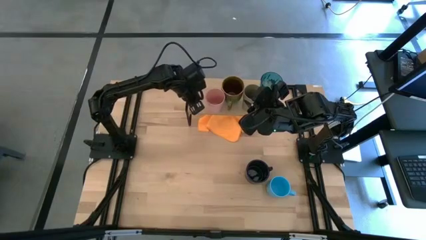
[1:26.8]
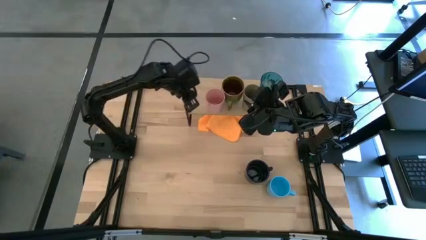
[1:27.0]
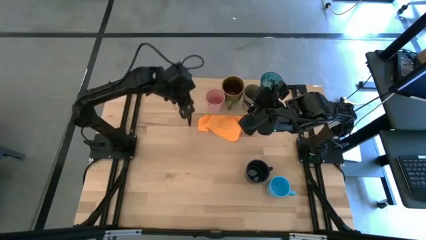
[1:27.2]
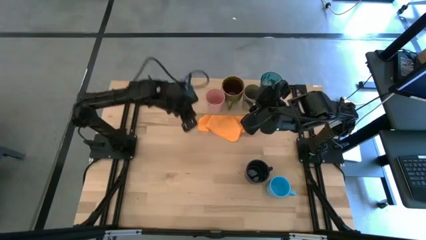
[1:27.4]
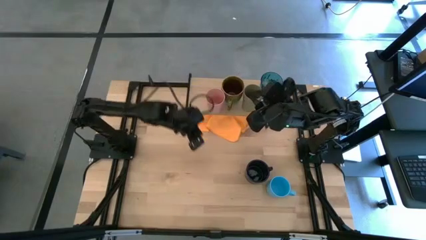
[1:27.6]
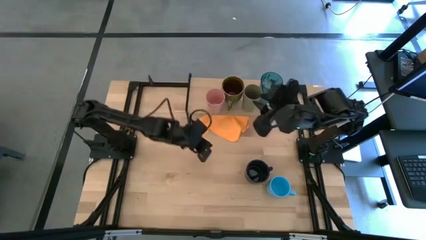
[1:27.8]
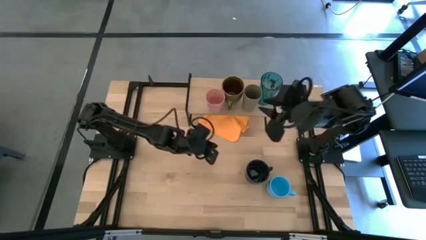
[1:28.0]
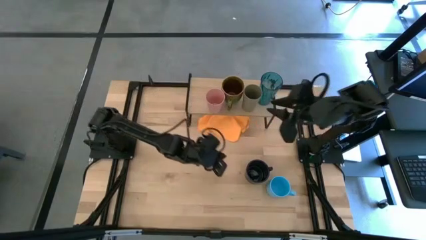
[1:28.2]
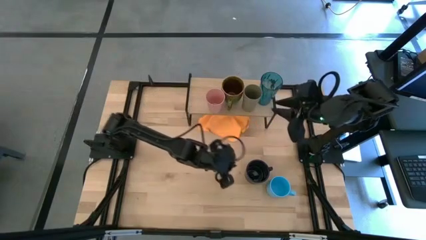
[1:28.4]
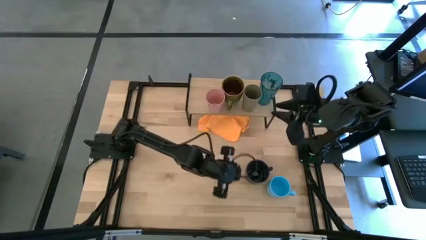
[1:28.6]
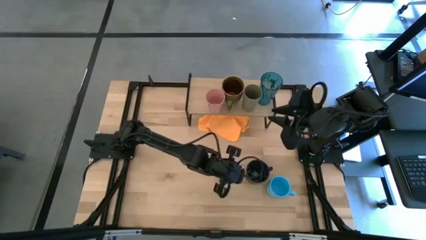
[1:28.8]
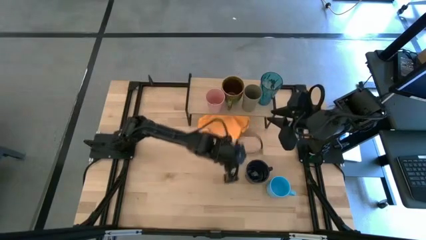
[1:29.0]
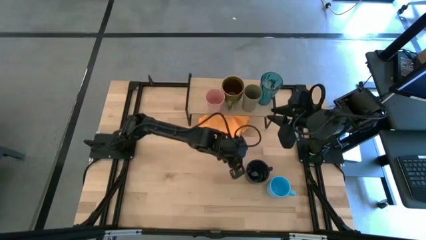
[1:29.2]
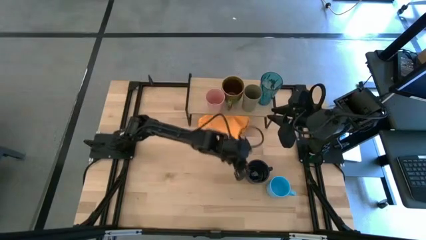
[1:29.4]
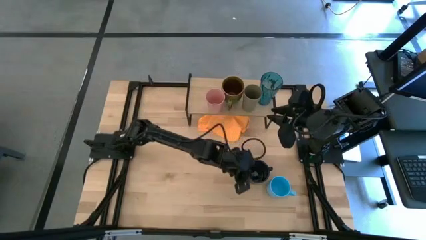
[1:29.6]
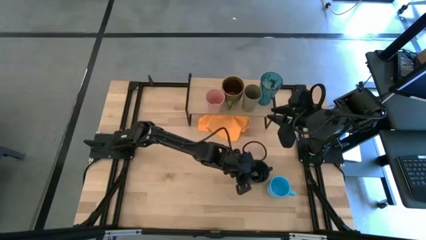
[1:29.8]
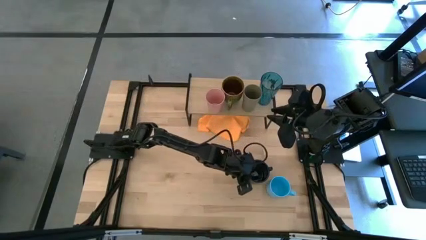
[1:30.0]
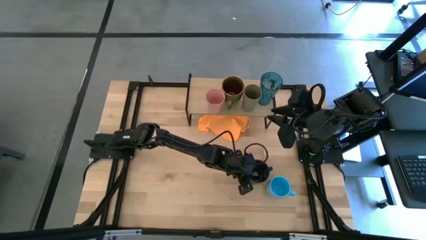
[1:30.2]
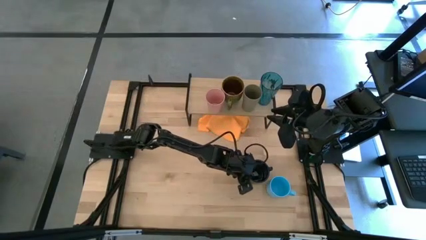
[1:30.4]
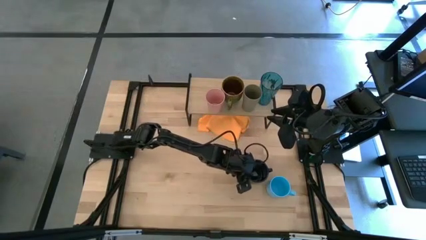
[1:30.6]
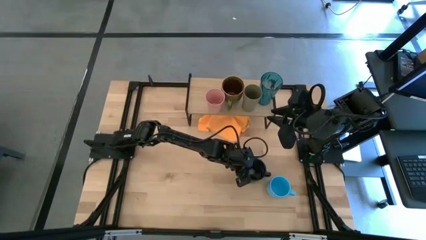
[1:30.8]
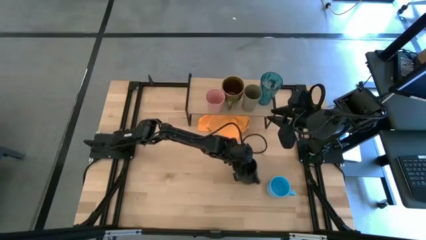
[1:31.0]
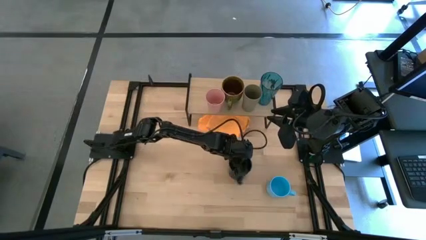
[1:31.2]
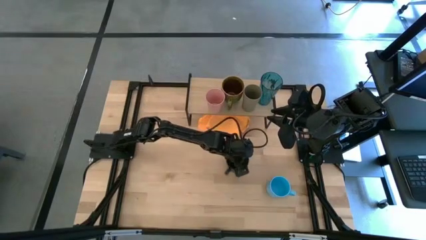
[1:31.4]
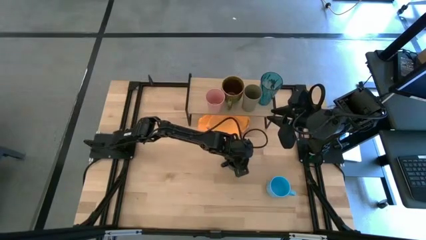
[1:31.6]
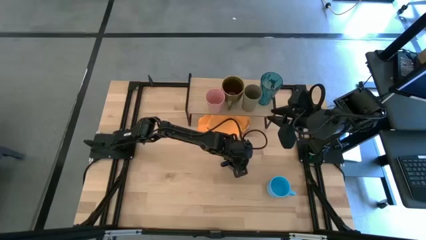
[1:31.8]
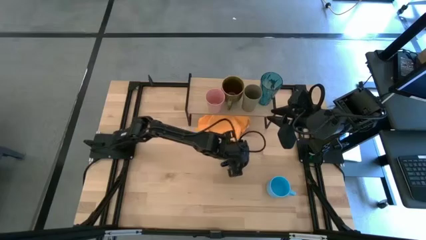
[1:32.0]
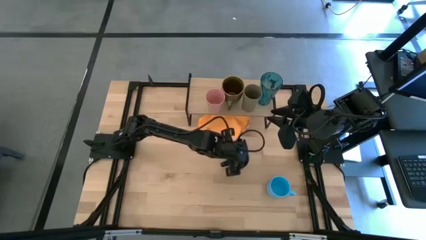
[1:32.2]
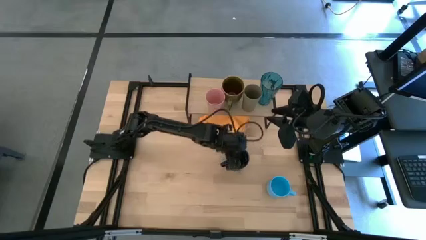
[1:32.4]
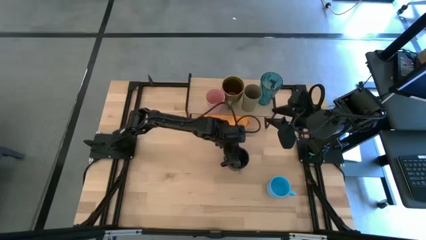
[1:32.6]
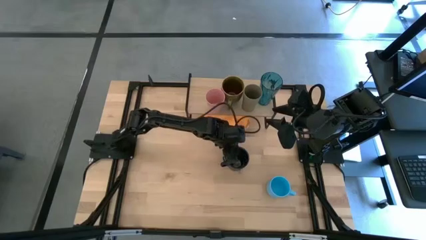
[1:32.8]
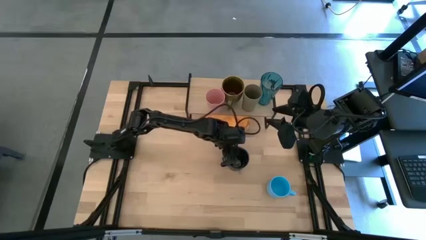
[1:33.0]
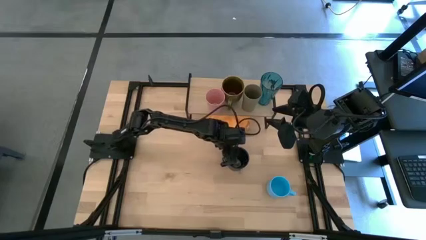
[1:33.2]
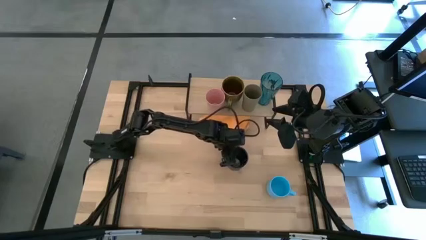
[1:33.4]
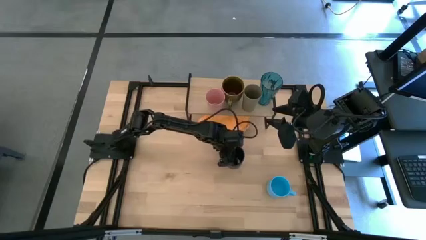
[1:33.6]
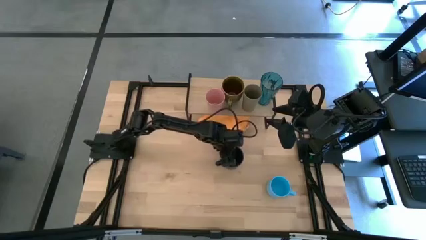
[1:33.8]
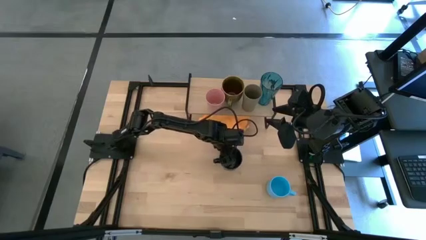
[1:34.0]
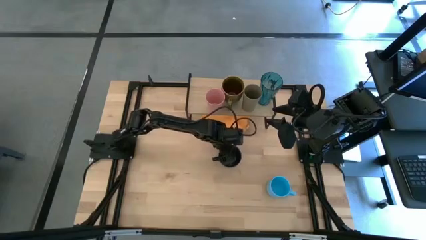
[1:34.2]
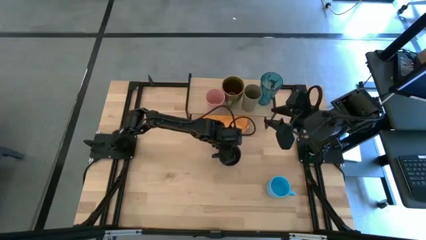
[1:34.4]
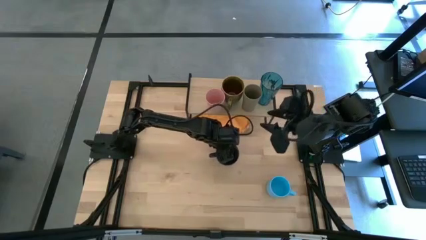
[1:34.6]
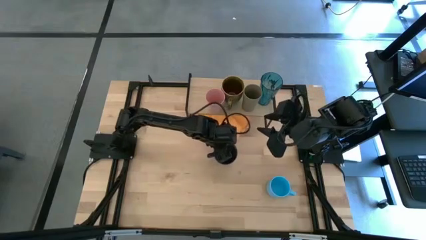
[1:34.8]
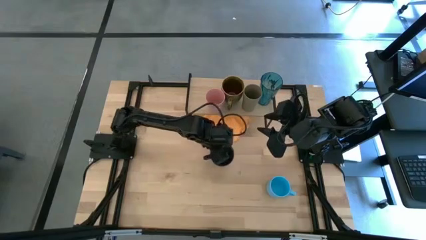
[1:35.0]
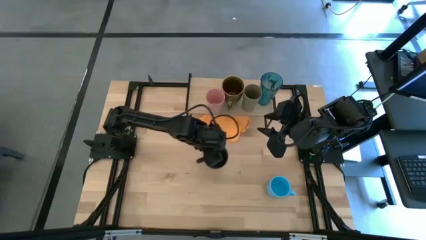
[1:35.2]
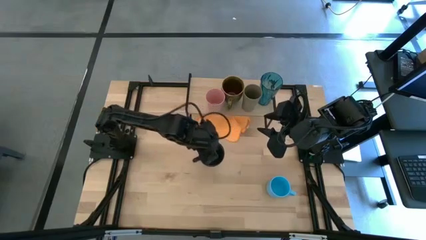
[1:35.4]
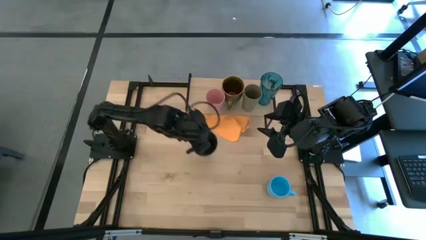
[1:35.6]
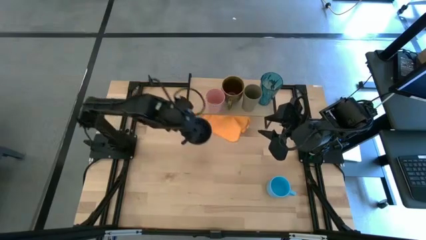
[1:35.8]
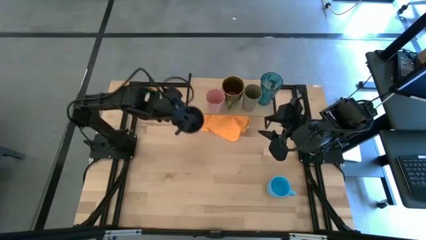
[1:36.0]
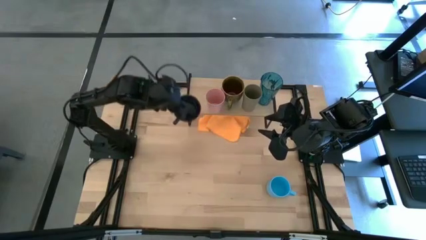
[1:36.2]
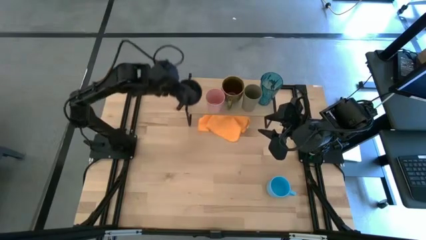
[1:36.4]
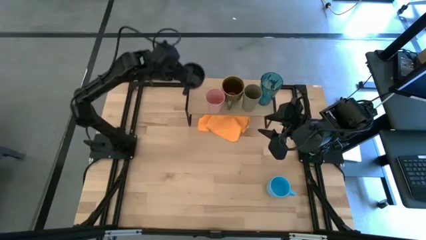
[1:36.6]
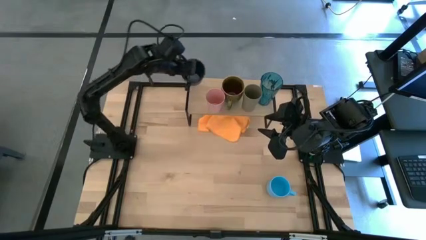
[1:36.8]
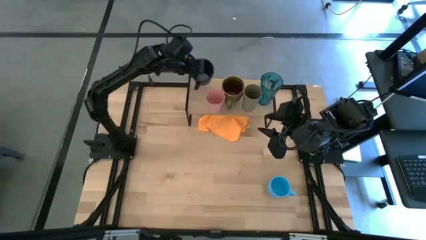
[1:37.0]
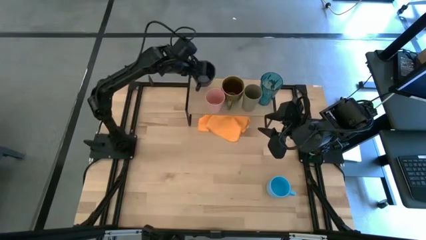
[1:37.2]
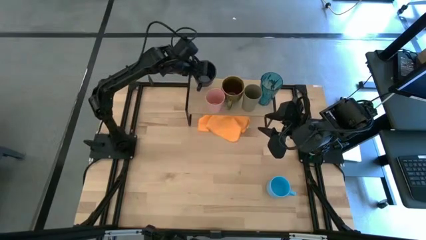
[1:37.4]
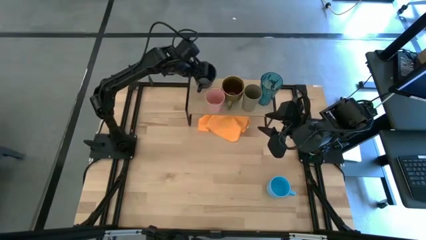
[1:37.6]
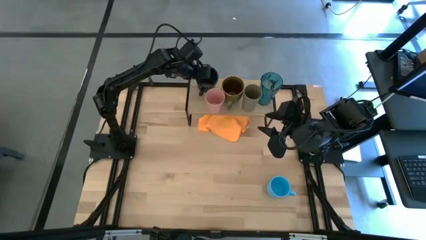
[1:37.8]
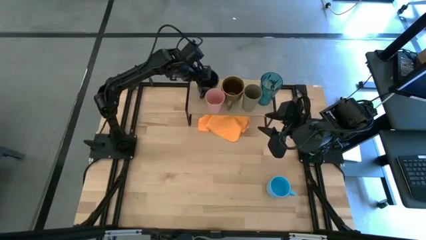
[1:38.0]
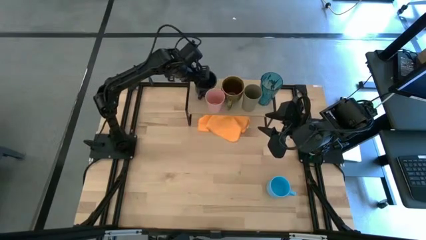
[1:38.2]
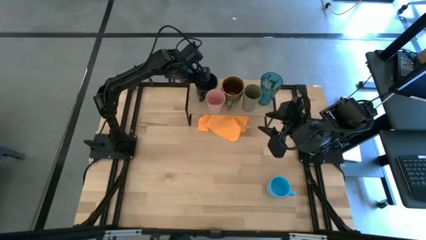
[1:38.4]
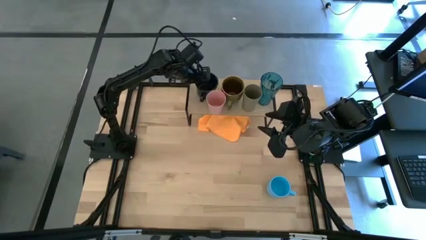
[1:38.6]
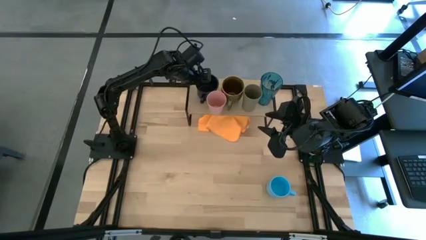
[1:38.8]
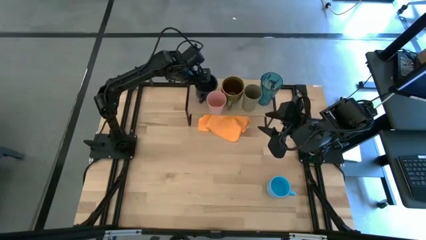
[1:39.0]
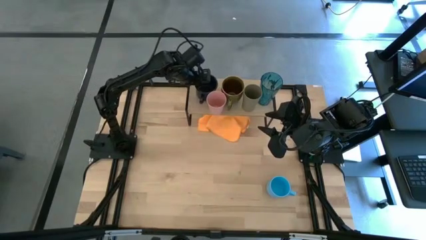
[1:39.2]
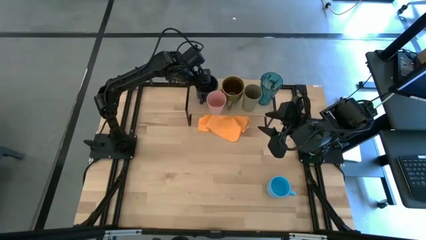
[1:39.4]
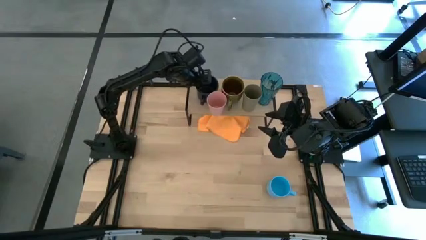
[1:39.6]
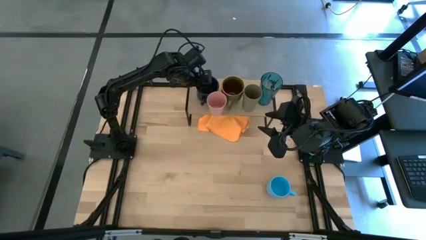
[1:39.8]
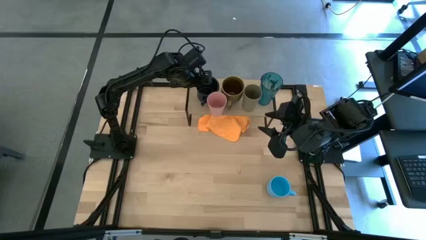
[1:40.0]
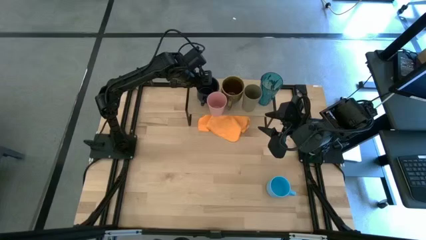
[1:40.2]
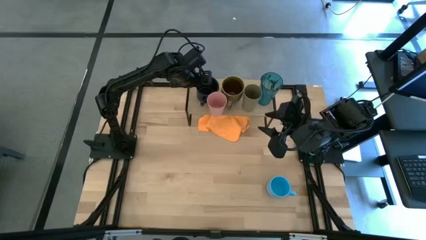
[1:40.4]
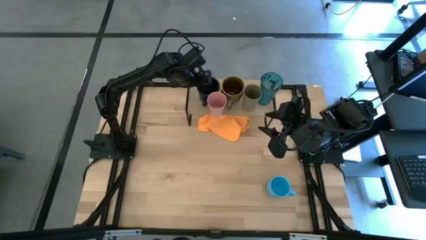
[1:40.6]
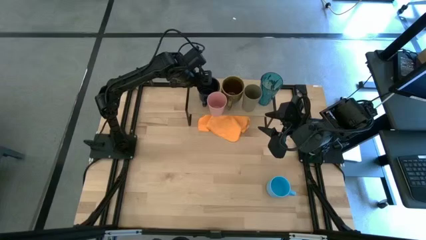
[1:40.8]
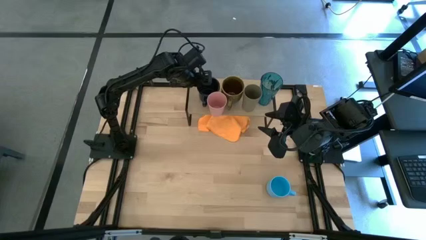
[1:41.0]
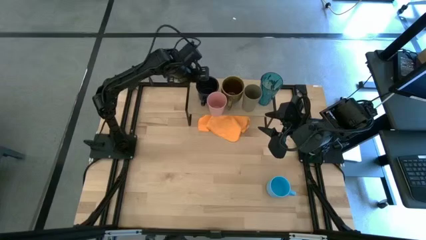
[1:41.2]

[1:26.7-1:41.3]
Task: Stack small to large cups/mugs on shelf
Put the black mug on the shelf

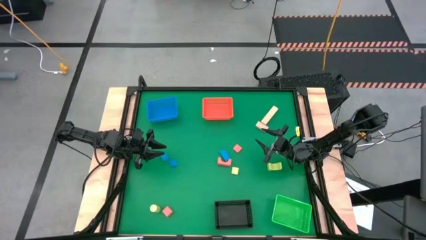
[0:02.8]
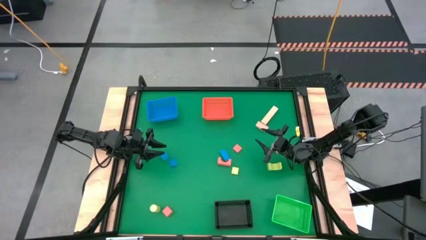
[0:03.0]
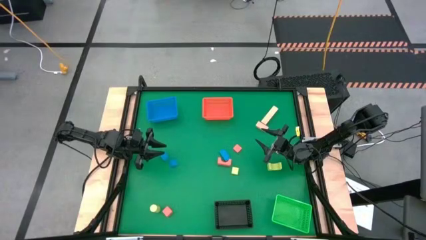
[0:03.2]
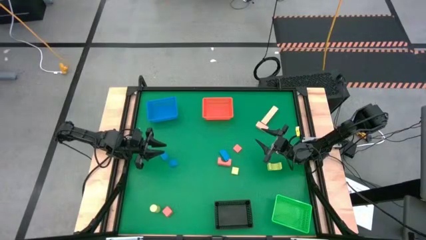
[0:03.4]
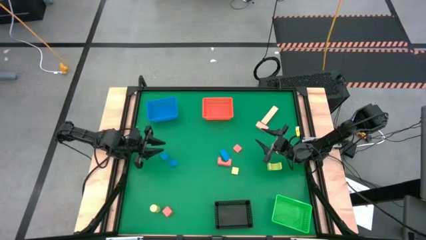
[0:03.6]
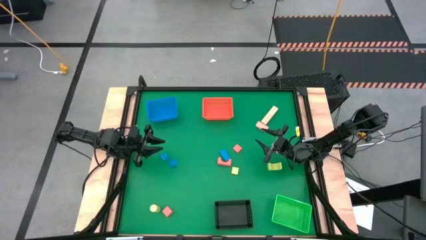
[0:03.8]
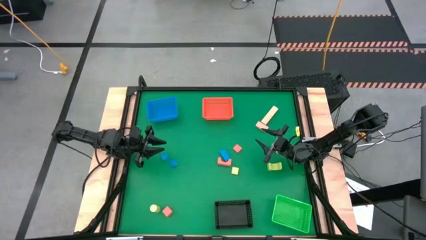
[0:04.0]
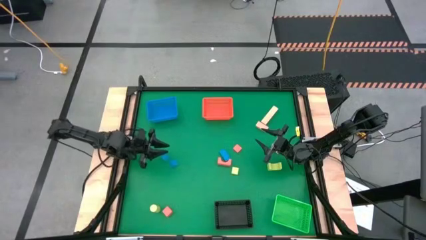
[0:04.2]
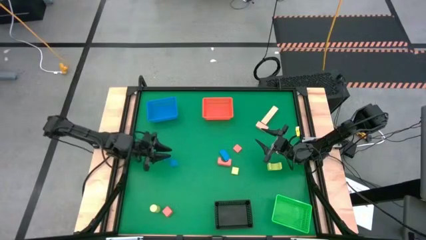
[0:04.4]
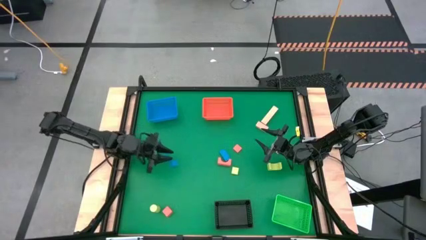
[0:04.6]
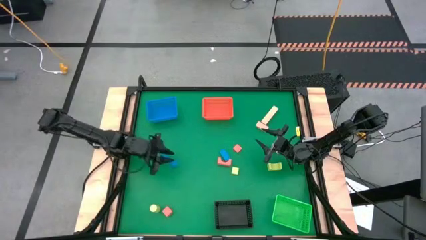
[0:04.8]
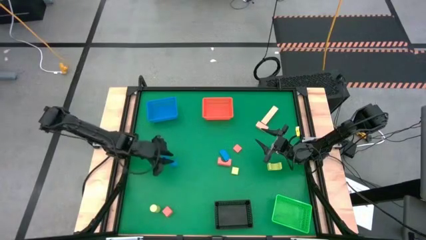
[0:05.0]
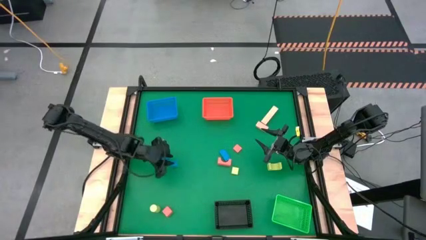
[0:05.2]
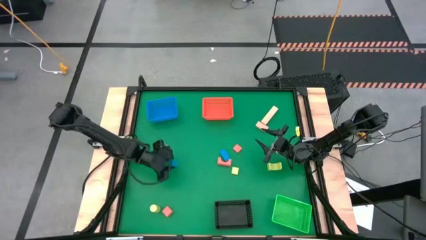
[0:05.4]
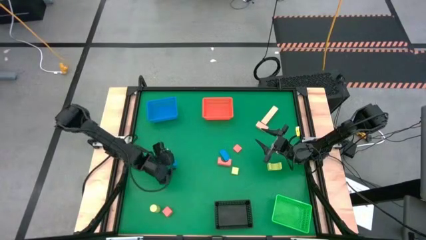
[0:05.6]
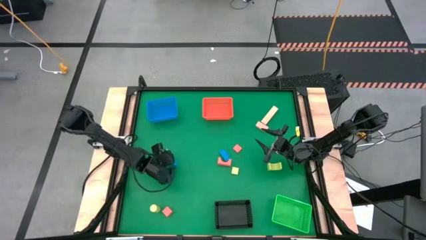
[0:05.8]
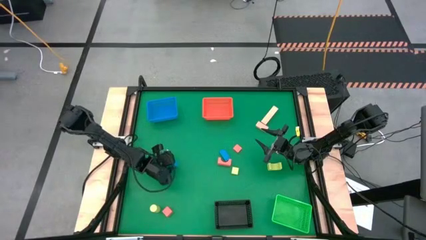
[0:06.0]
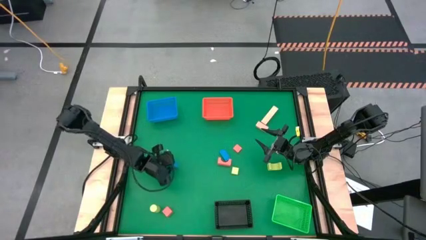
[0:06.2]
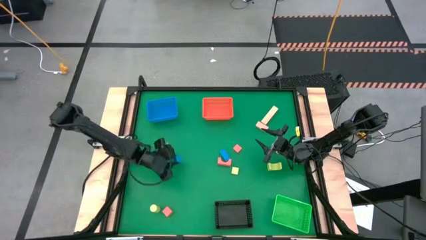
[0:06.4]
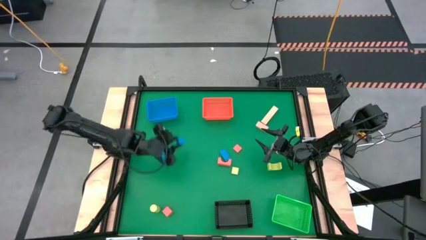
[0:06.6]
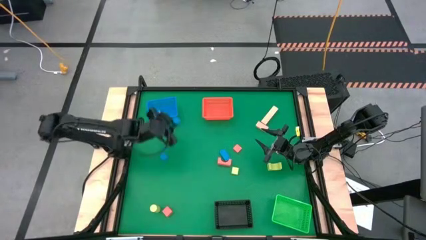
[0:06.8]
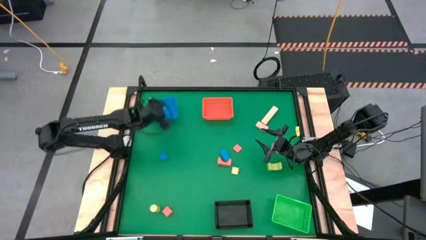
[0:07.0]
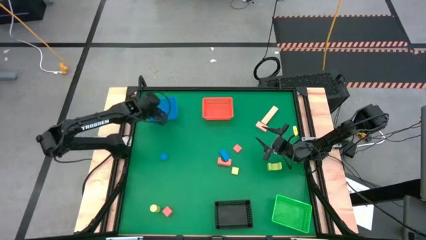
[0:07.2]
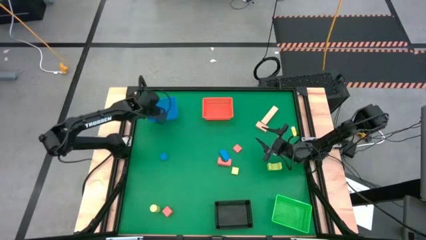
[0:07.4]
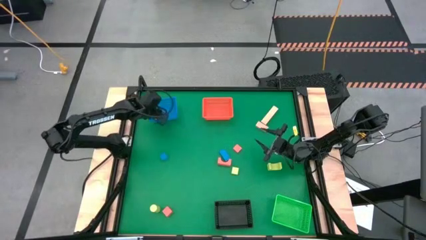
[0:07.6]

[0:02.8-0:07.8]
Task: Sort & place blocks by color
Put the middle blue block into the blue bin
